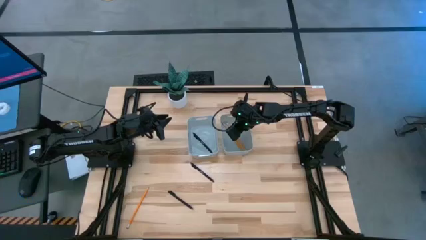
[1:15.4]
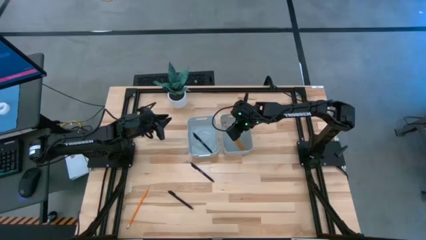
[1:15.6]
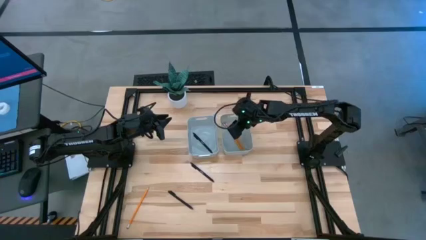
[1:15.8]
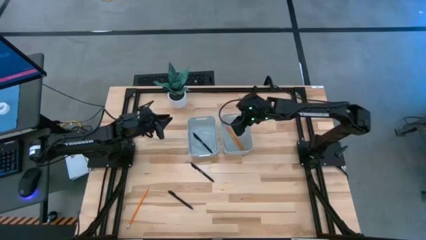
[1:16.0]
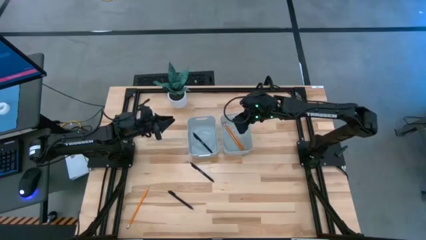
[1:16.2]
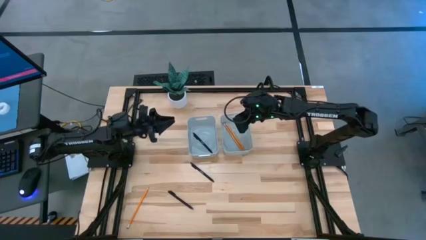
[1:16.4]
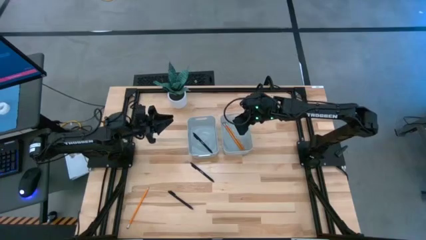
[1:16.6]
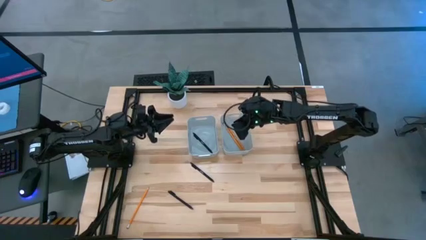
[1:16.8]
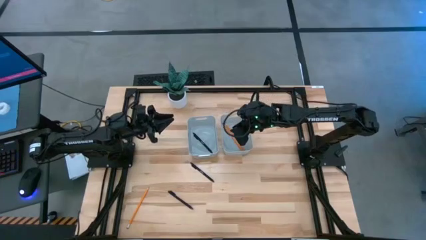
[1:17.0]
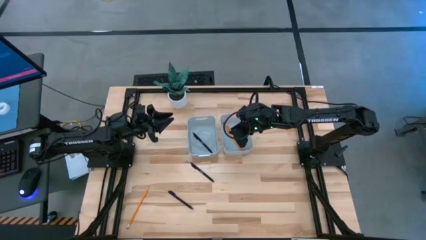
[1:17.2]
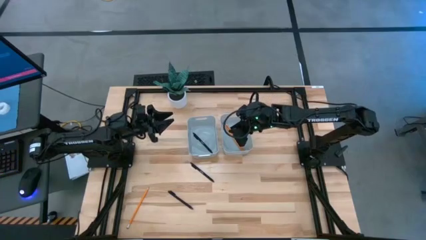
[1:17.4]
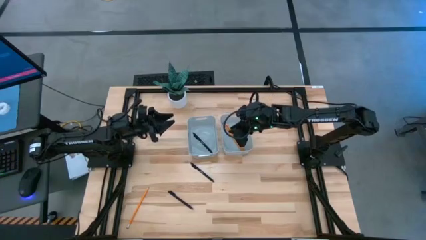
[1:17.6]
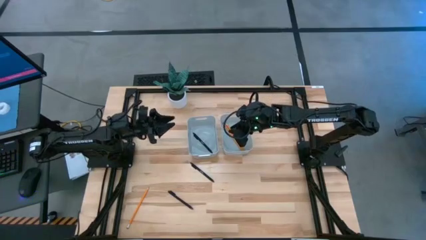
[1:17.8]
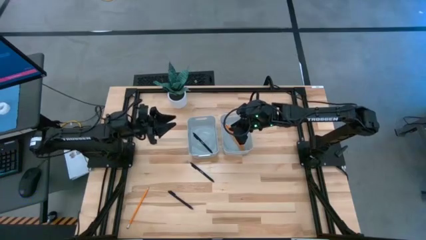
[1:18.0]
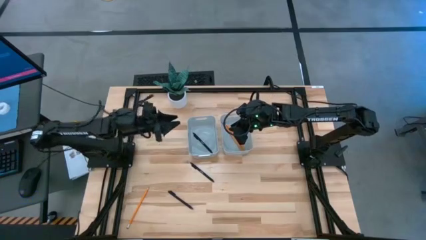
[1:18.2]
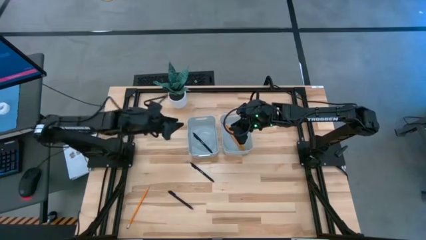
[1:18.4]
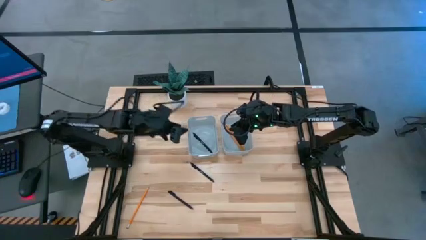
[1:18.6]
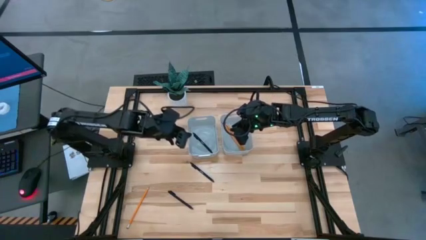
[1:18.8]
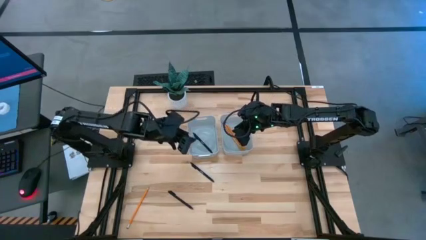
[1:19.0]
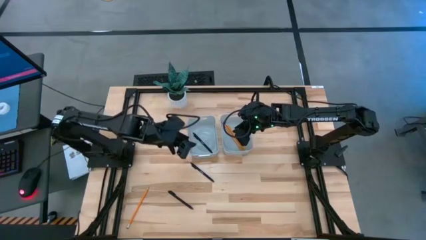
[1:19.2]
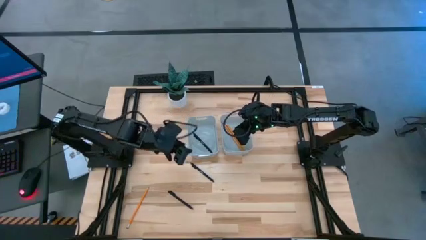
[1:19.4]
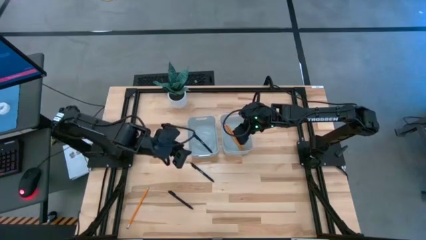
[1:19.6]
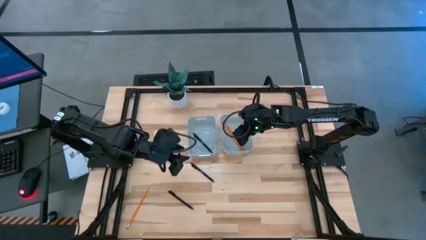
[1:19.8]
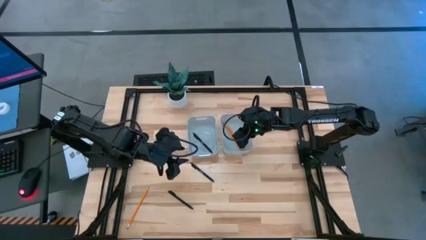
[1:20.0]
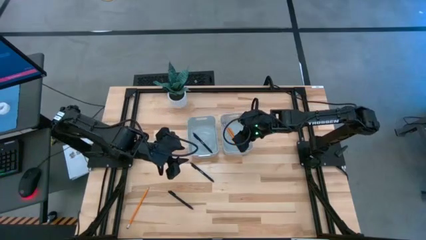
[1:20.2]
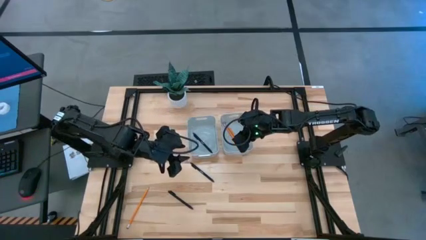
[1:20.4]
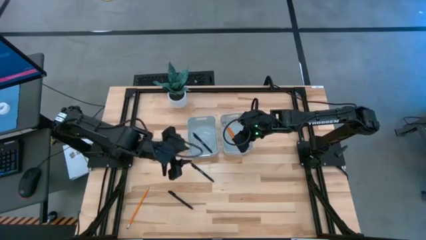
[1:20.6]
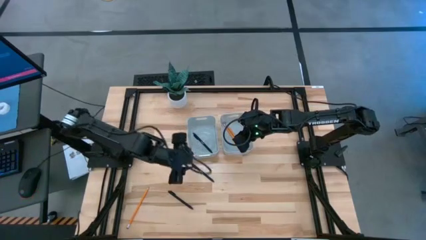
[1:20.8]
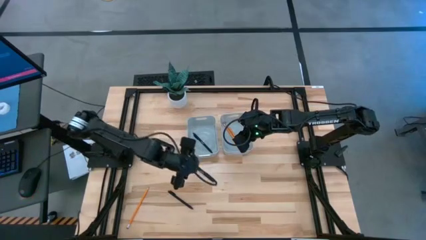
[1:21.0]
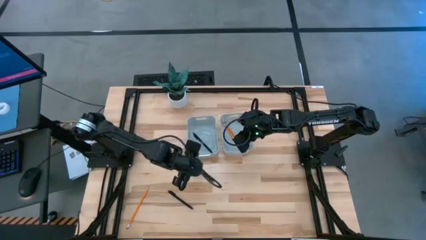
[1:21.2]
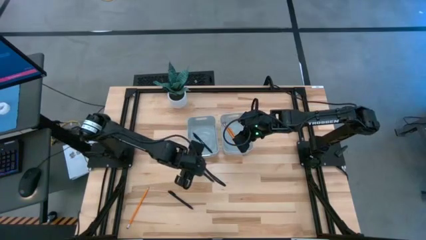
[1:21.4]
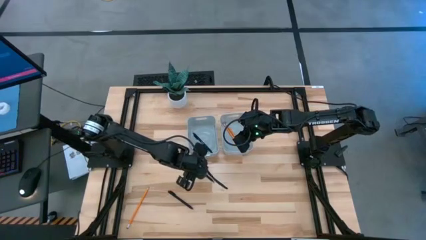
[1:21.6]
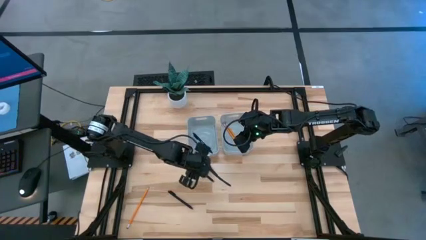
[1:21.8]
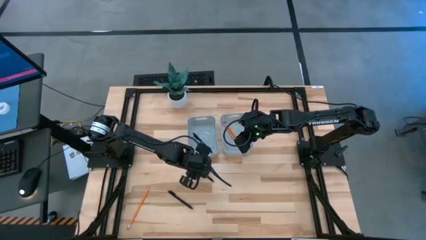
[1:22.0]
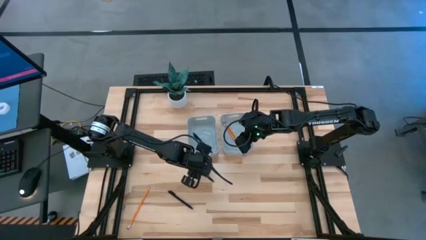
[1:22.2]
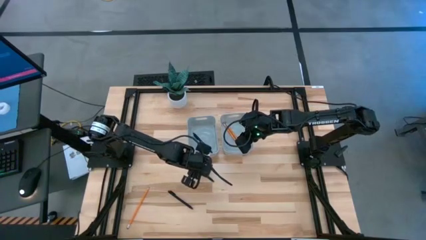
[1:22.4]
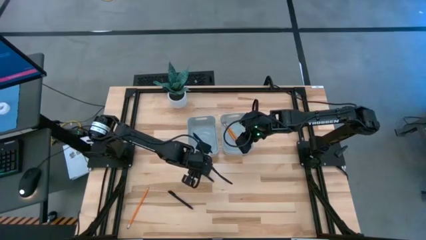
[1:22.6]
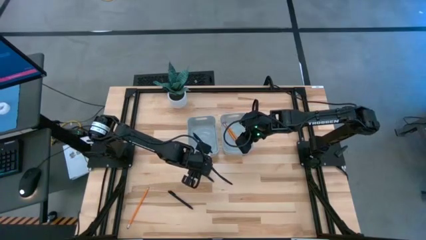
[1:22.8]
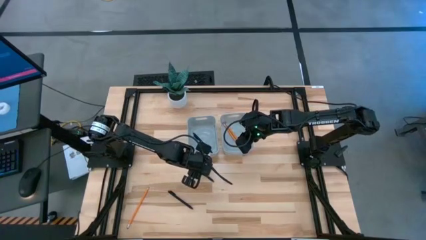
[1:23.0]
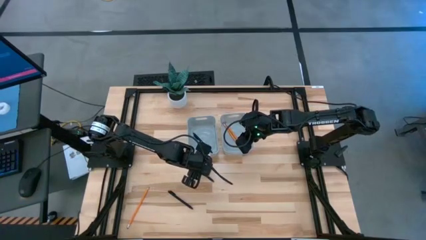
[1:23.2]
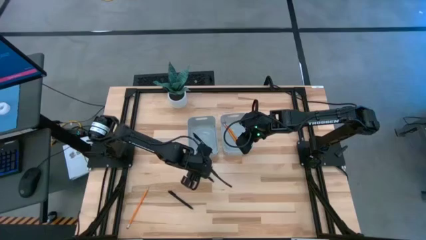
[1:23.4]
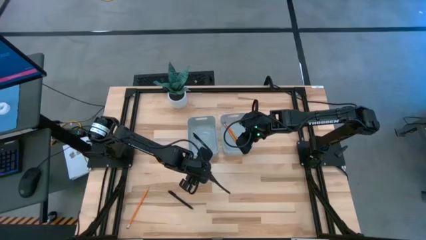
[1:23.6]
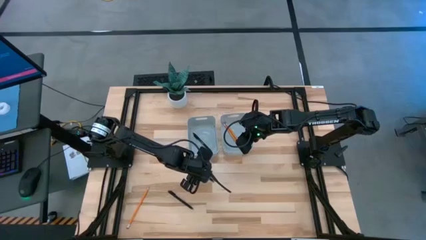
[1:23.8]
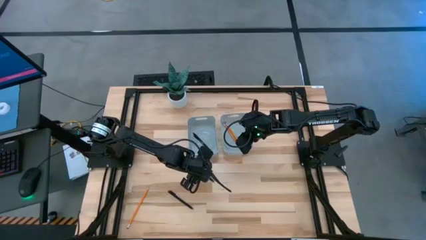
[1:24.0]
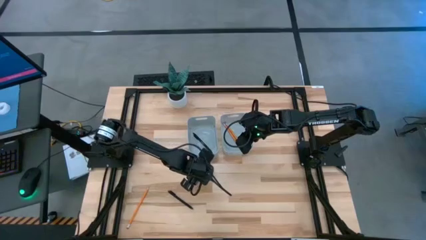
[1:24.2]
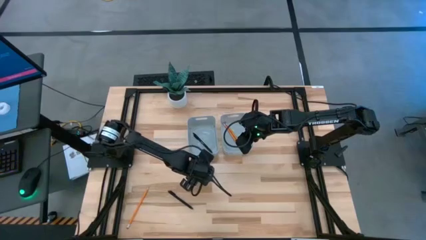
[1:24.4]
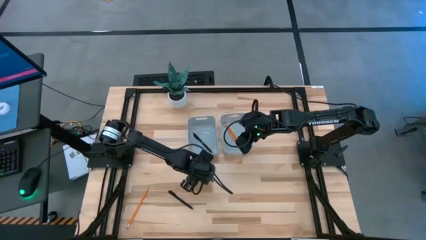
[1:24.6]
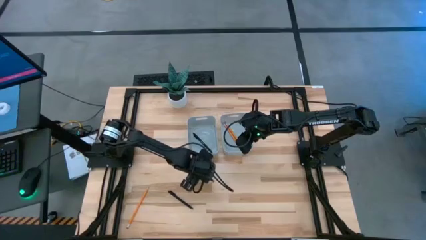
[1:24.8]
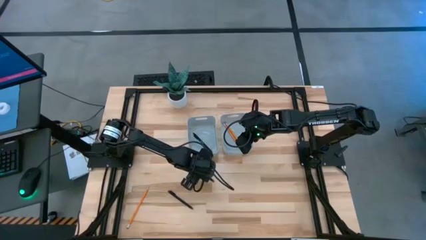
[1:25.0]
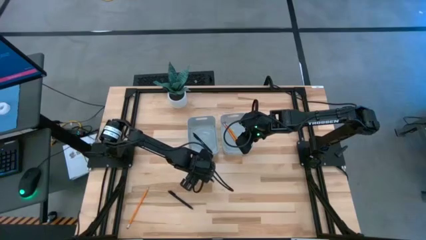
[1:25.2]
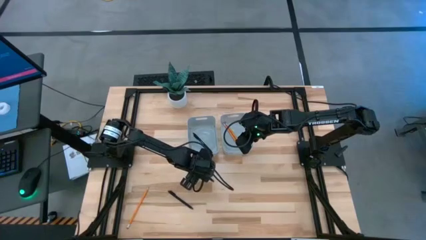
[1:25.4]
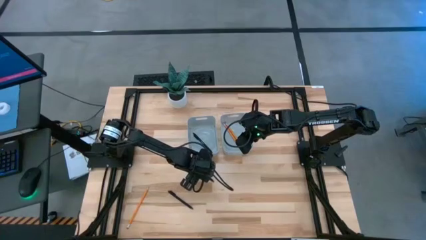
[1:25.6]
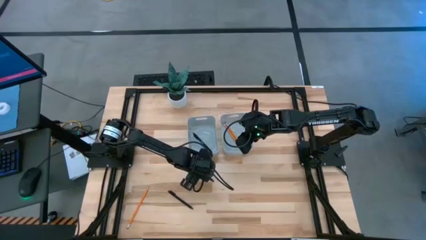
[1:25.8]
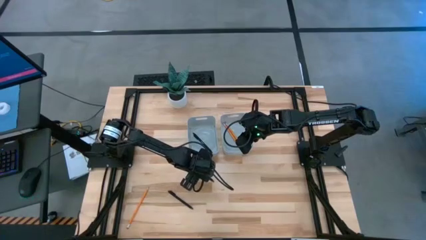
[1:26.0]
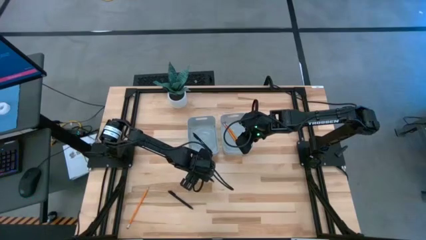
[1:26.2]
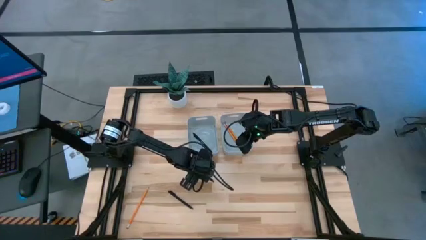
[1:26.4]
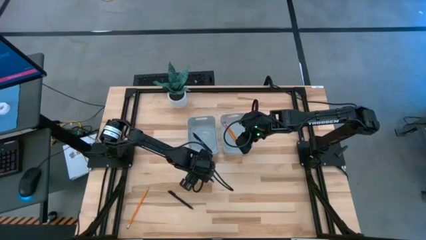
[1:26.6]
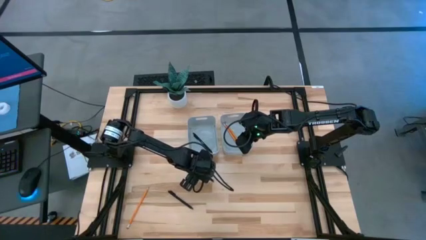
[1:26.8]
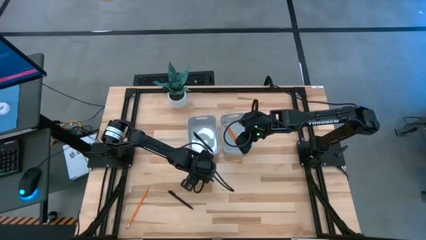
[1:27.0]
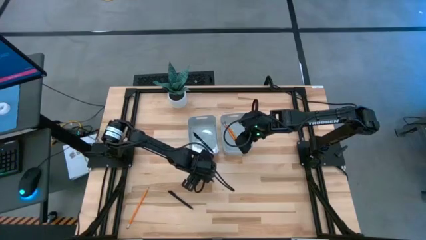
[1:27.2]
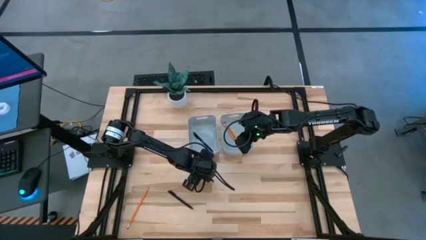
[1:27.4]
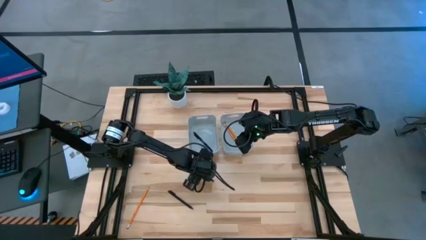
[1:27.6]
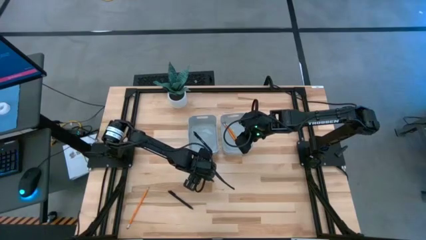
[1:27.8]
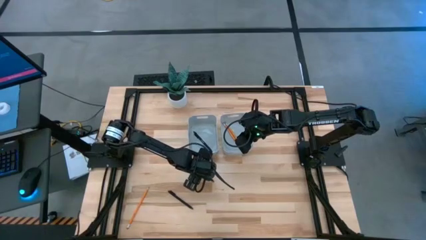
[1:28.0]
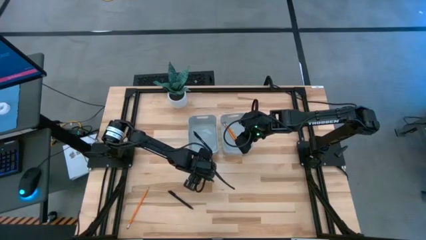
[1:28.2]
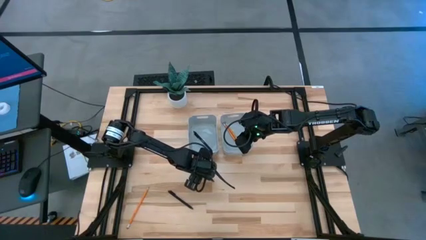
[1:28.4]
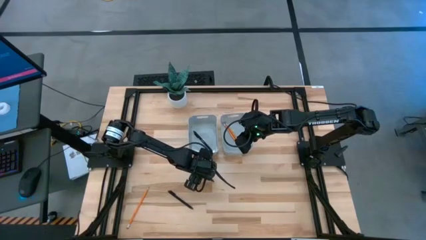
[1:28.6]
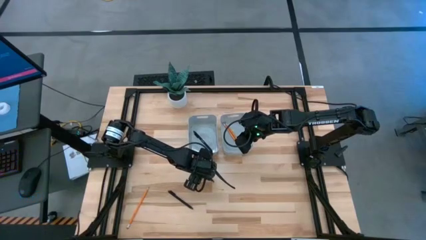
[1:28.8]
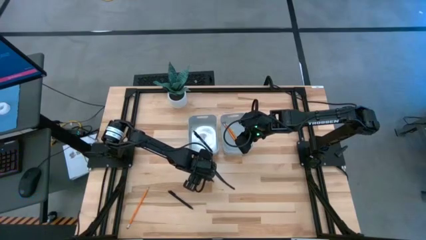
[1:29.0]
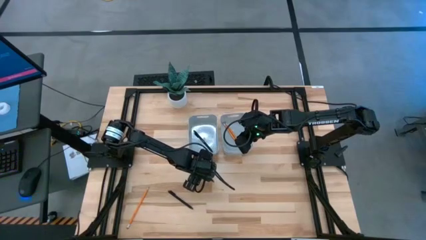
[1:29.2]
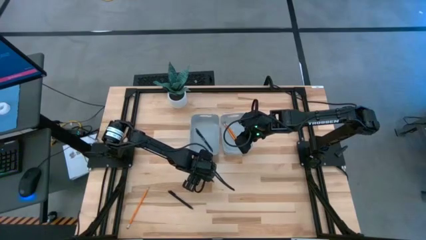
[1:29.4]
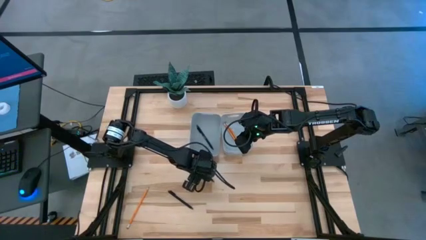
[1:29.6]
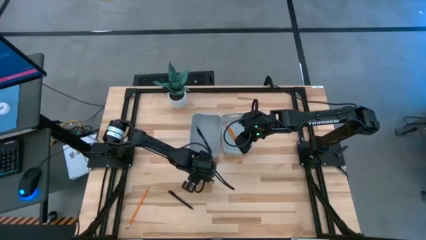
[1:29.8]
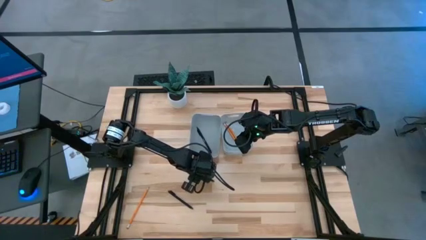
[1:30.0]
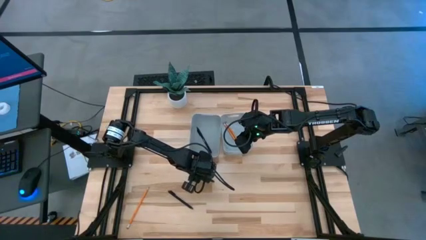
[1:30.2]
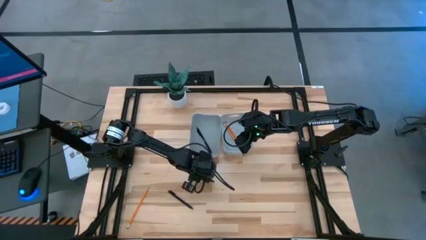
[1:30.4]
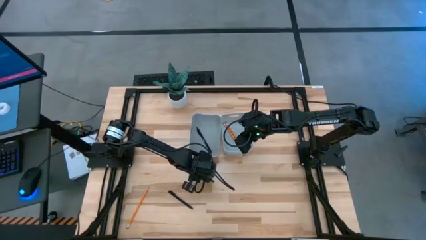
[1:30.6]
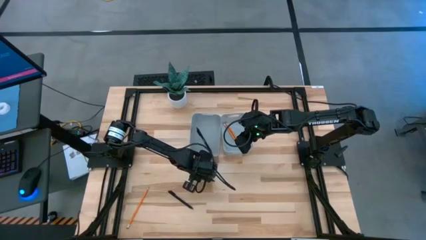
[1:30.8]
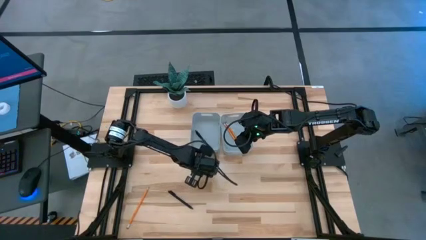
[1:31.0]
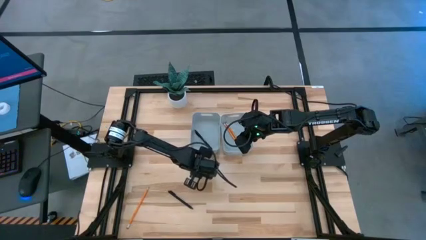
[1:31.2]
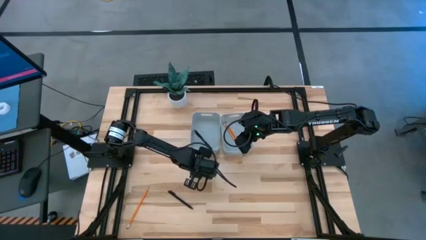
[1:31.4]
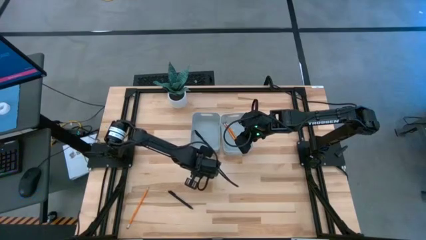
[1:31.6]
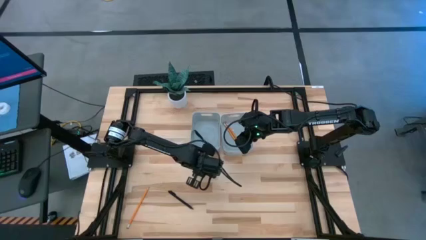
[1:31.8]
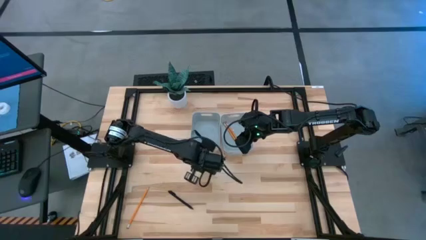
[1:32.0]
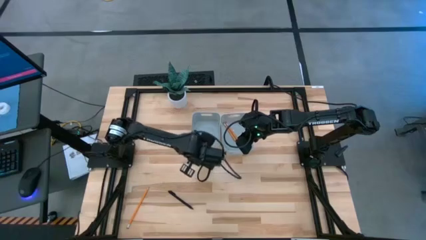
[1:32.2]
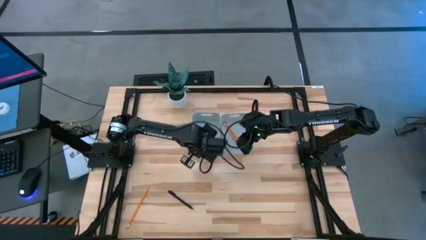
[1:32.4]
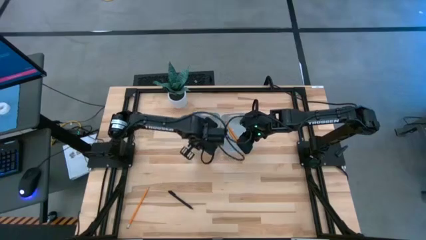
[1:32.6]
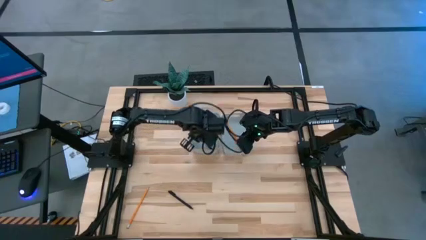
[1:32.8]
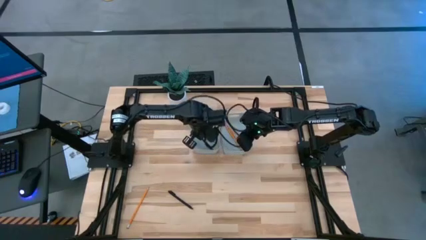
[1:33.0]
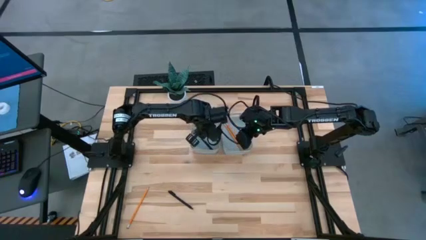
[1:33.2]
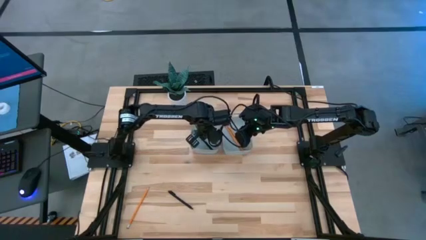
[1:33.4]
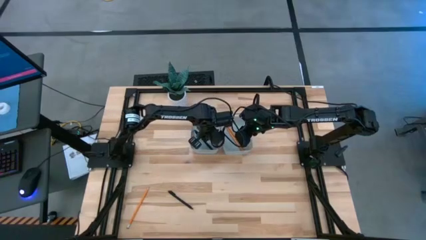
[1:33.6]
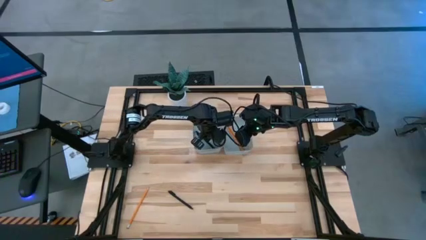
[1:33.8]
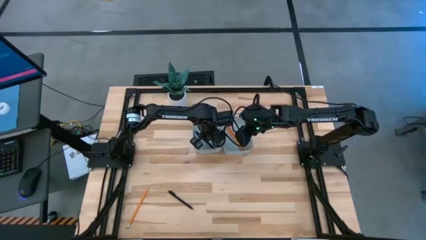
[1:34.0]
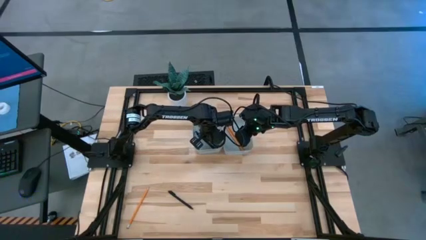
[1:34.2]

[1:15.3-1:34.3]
Task: Sort pens & pencils
Put the top black pen into the left gray bin
